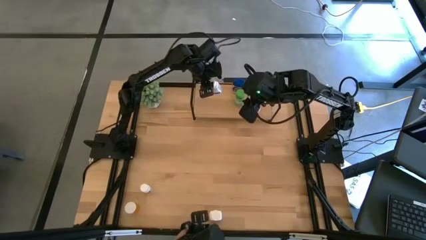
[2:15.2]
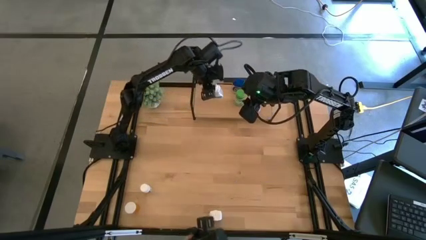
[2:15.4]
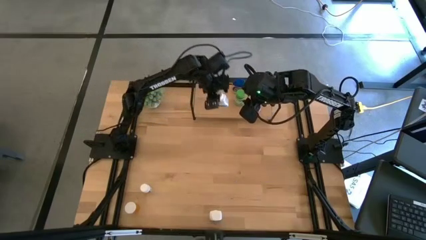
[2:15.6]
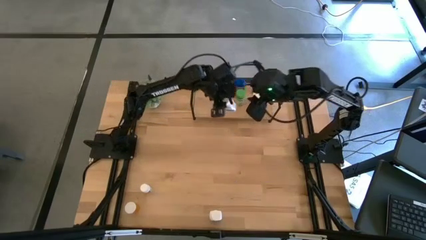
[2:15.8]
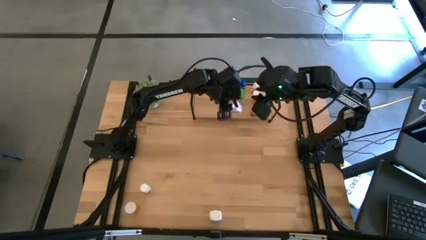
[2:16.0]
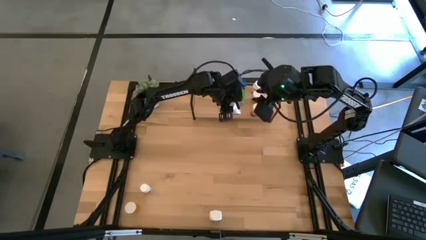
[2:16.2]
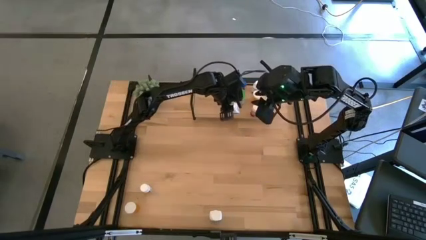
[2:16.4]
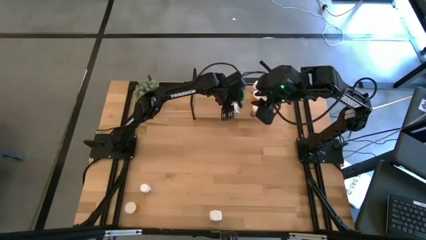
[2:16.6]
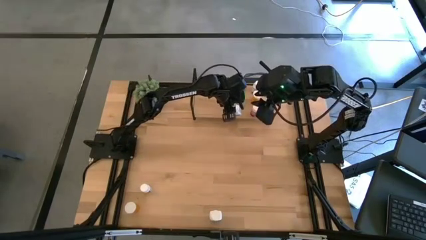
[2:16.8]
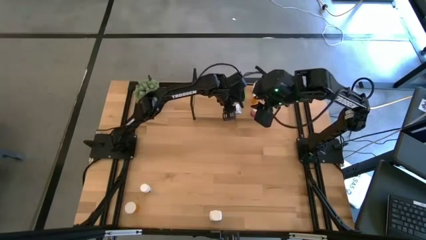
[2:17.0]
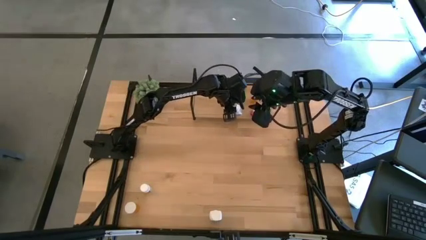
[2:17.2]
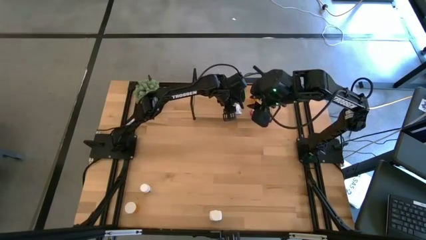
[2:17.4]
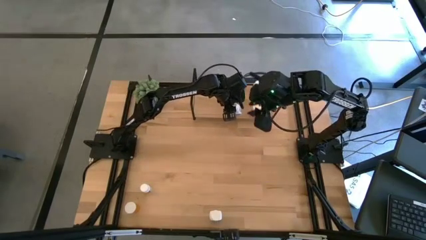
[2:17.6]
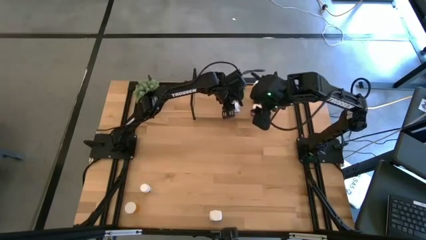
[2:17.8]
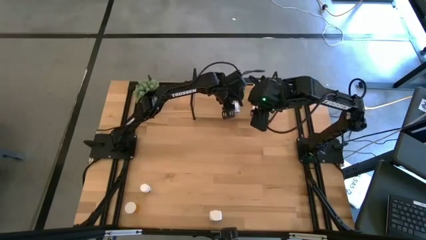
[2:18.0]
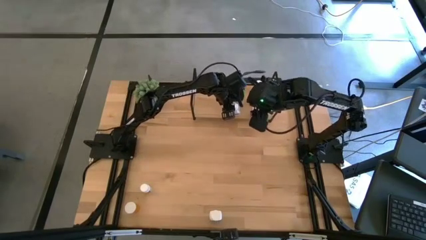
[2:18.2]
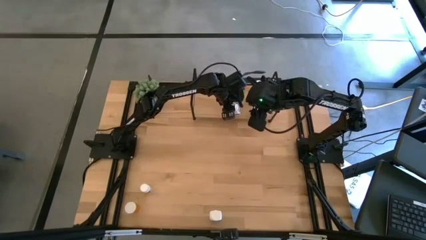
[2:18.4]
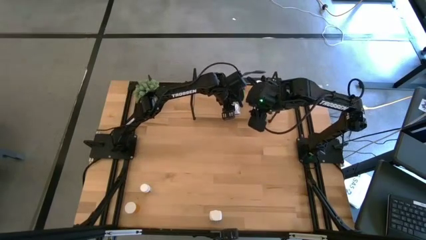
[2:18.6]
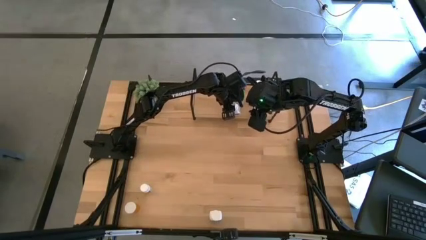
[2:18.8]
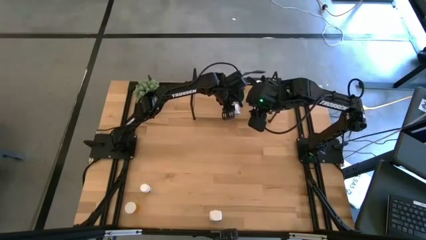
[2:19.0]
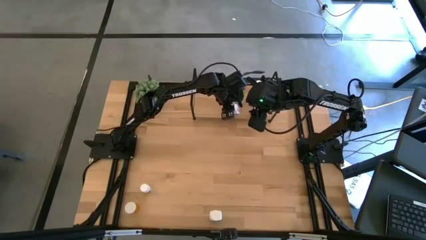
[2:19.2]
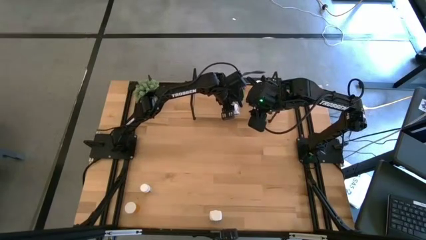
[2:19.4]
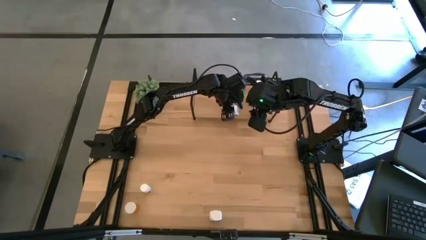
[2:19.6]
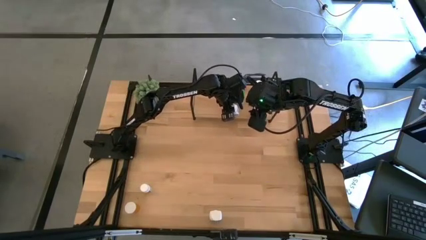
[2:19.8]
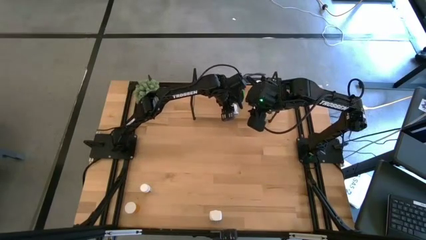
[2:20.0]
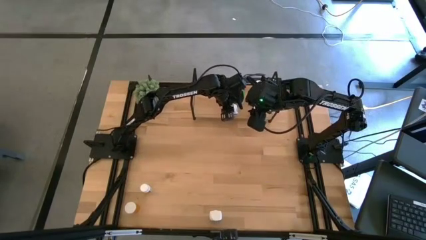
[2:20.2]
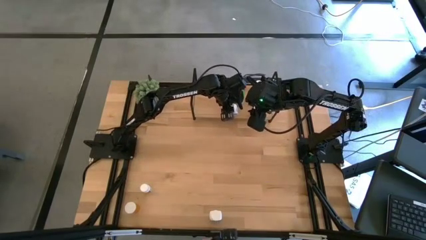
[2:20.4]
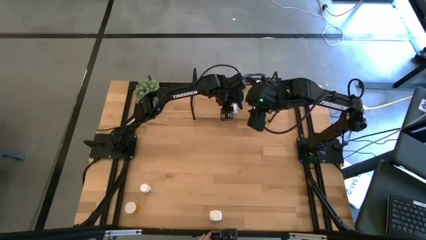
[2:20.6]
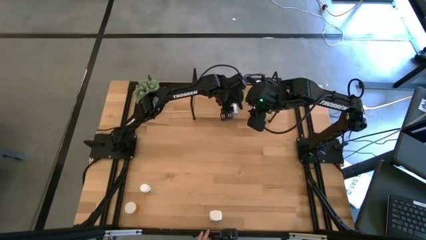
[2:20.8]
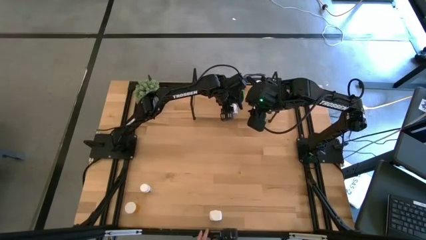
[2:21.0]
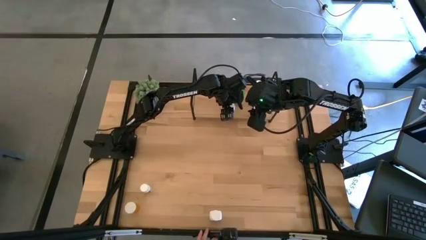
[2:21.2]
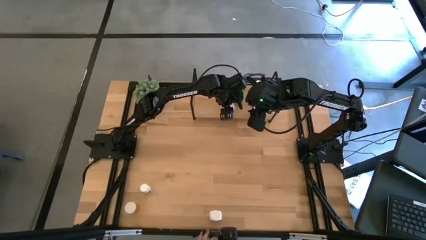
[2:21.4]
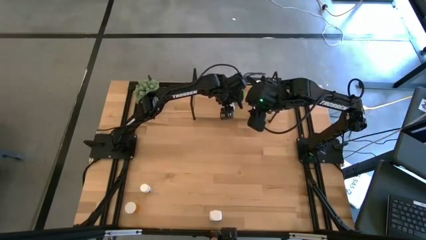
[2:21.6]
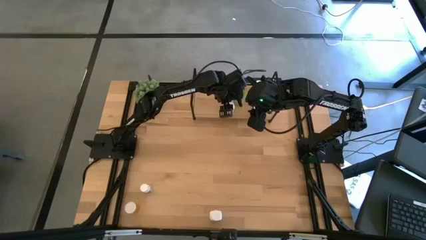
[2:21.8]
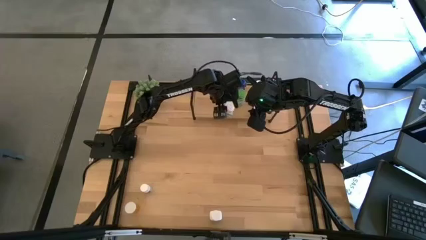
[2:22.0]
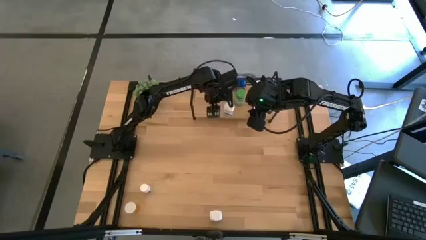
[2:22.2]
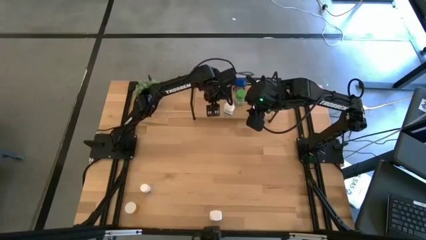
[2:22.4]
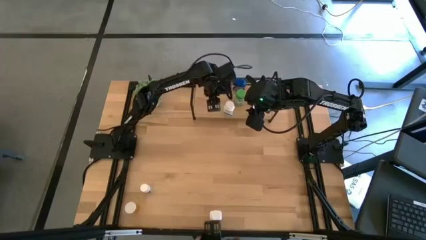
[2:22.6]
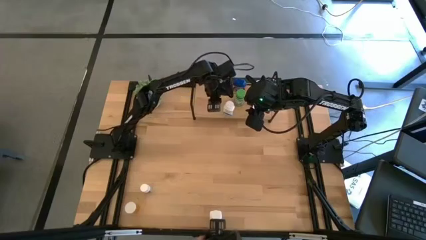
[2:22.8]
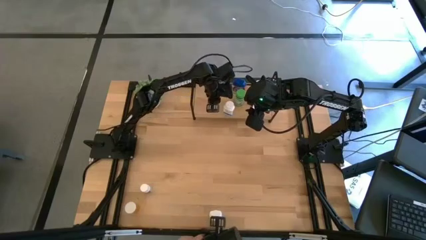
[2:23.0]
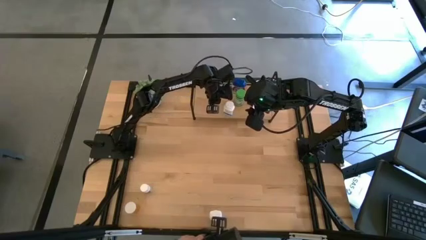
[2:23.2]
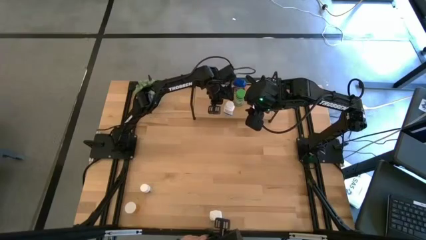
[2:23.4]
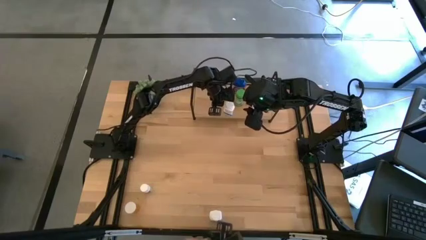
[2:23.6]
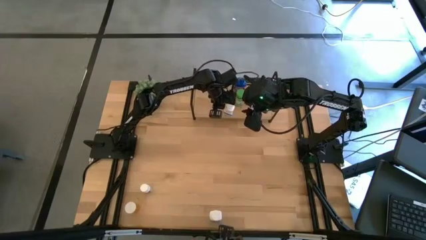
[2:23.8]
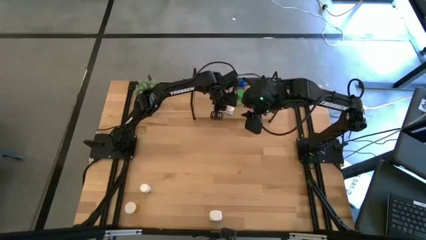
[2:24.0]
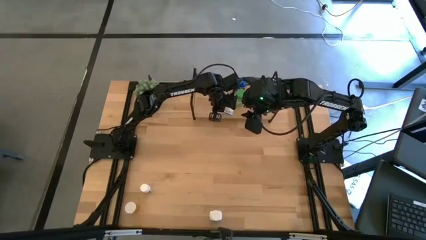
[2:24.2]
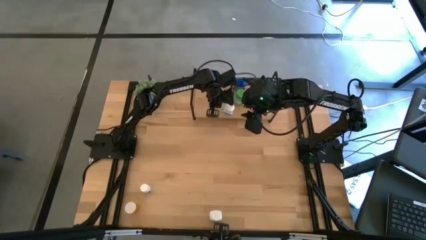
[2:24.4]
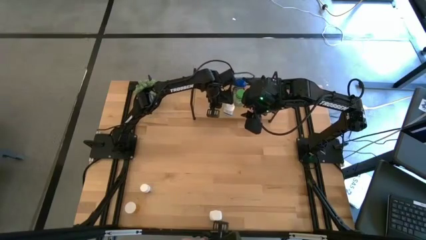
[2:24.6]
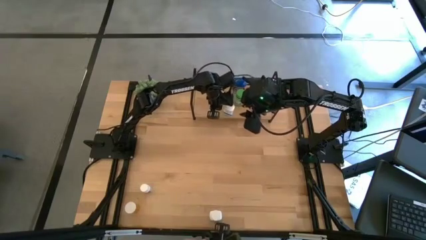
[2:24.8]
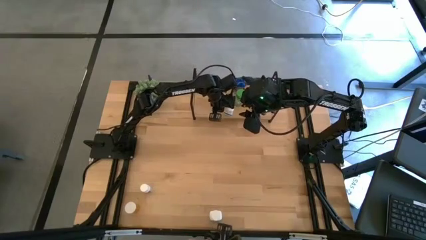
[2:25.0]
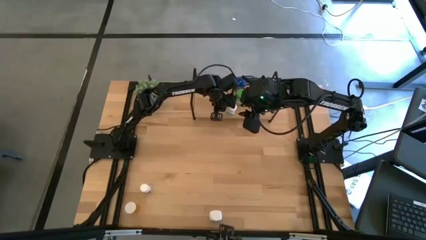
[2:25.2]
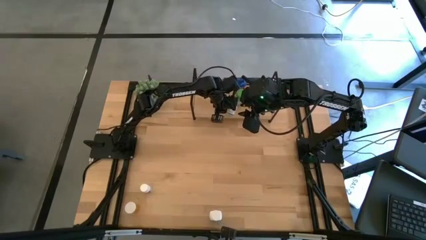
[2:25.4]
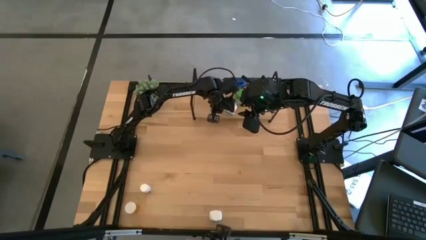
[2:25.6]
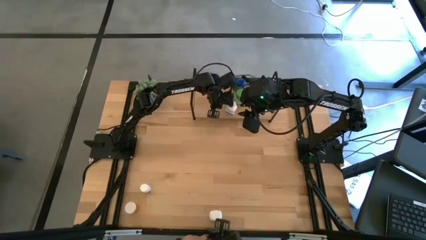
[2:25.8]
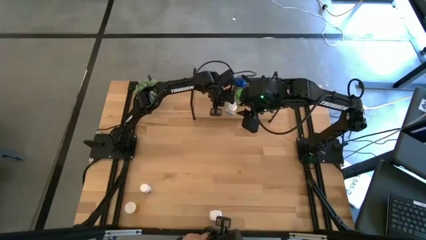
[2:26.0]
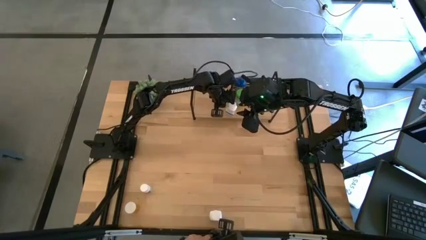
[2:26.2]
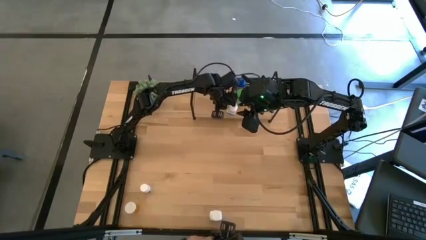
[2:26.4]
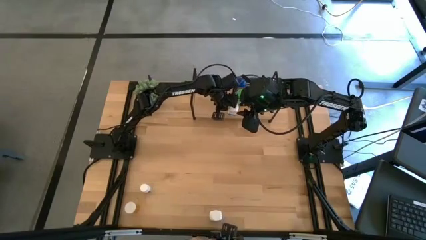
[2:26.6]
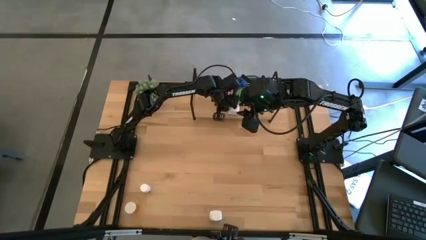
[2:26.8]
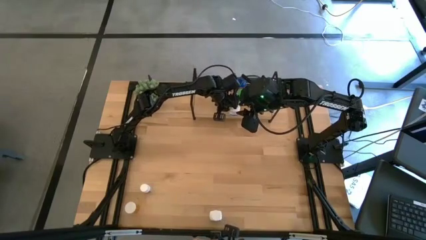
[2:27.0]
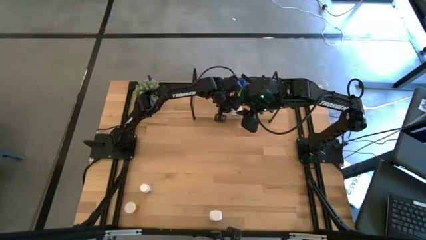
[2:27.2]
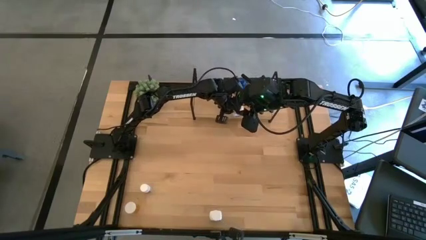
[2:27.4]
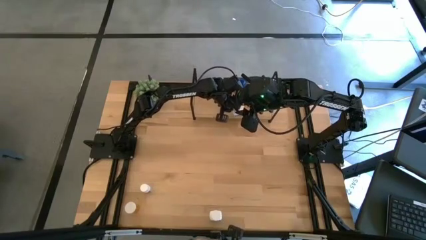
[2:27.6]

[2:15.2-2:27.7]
Task: Pick and place medicine bottles onto shelf by color
Put the top white blue medicine on the shelf

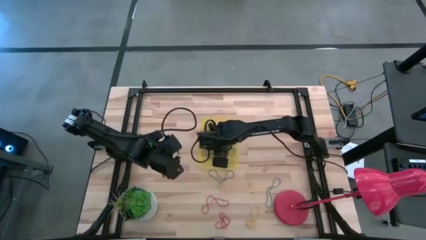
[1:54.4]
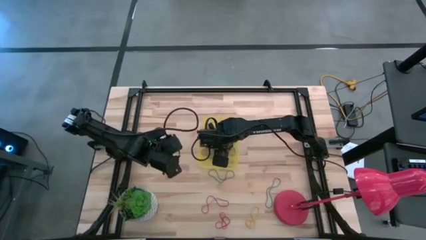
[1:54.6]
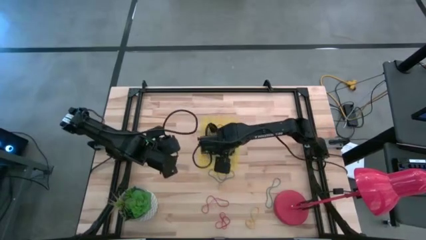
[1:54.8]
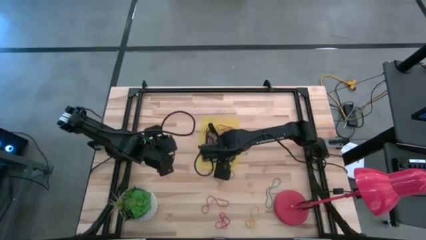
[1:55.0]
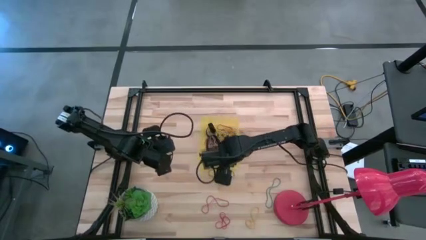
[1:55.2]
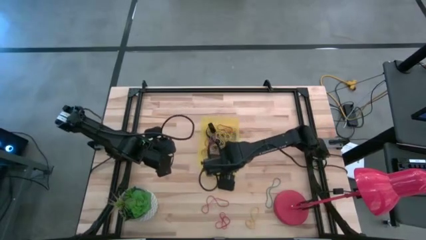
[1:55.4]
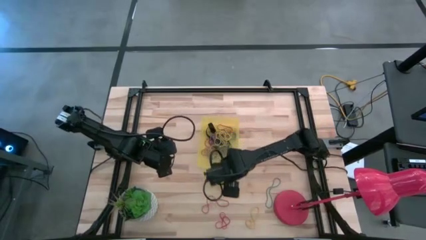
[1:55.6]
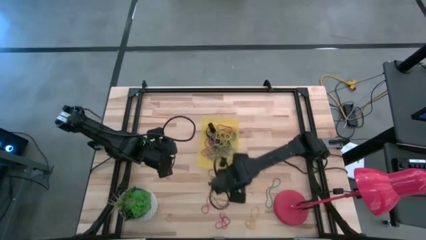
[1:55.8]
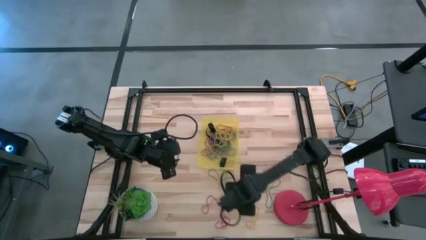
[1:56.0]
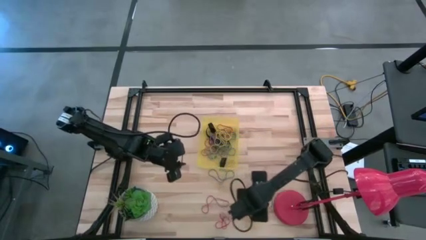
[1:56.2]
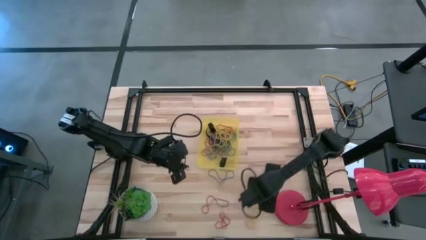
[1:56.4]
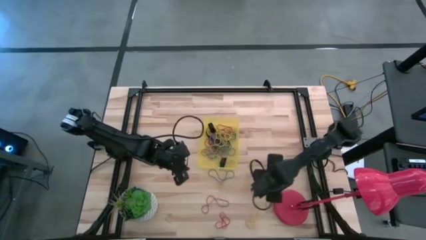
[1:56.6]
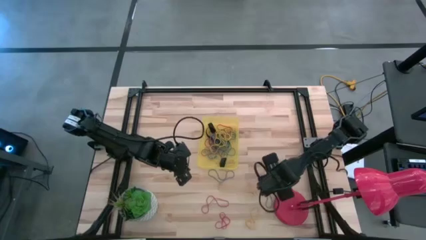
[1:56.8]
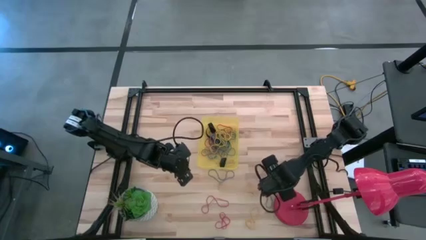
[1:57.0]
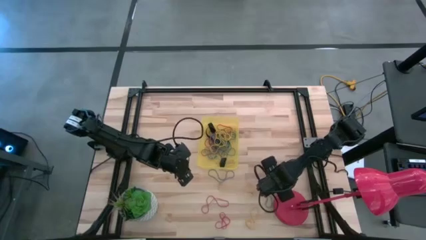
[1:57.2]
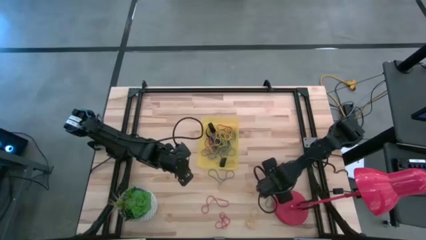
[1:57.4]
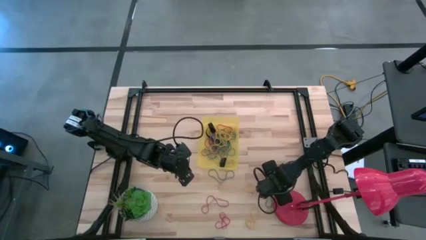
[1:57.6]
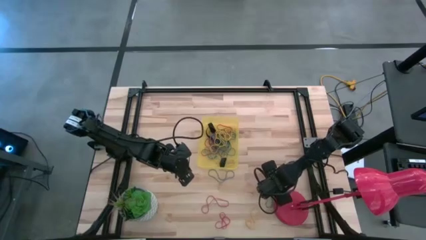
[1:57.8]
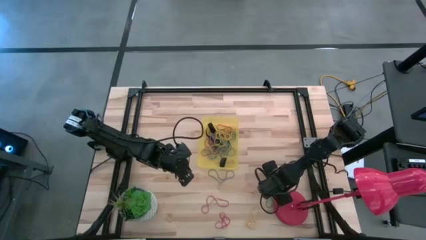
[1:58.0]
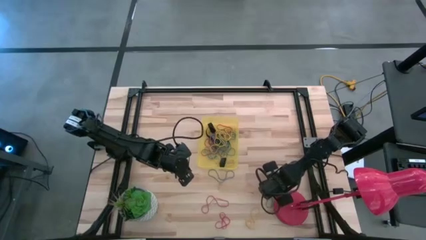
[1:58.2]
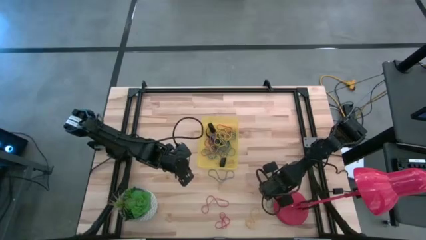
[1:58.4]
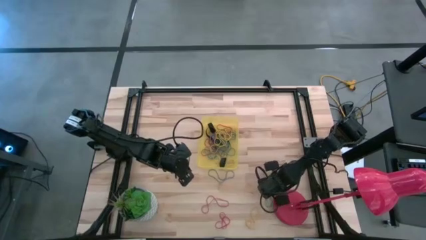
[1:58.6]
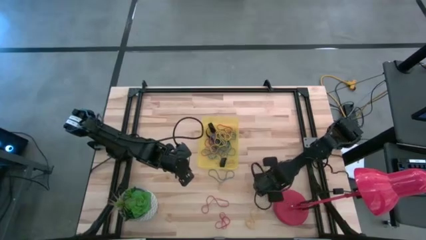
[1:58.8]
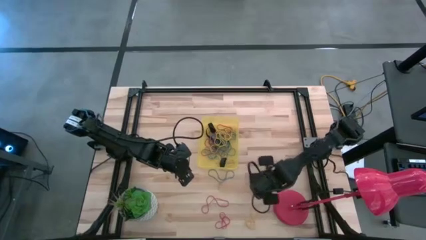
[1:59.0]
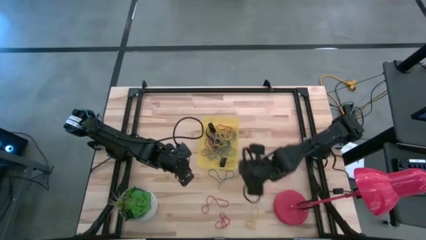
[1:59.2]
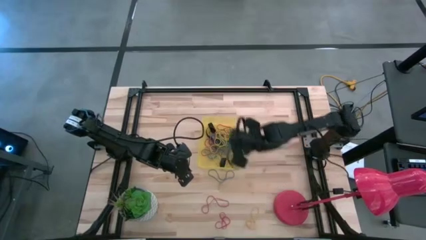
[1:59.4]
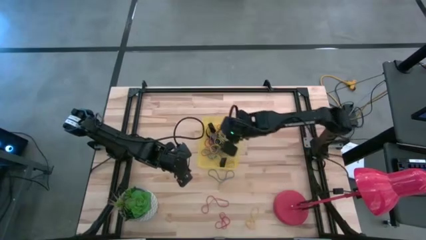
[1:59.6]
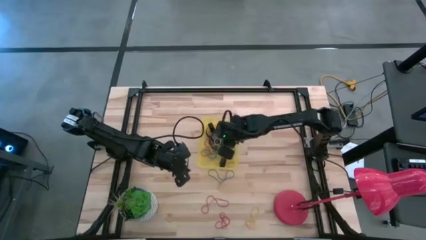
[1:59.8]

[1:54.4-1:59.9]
Task: Pick and place rubber bands into bin
Put the blue rubber band into the yellow bin
